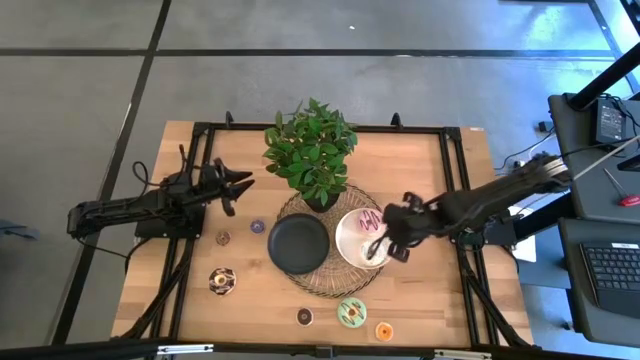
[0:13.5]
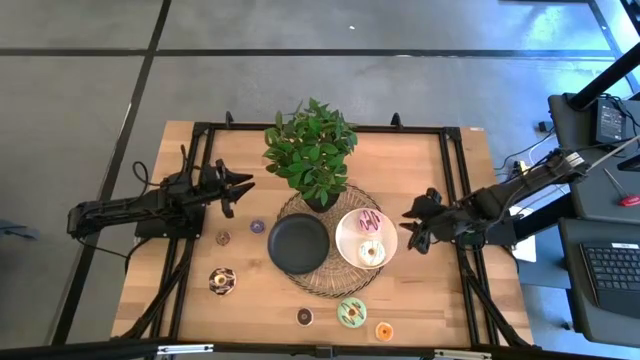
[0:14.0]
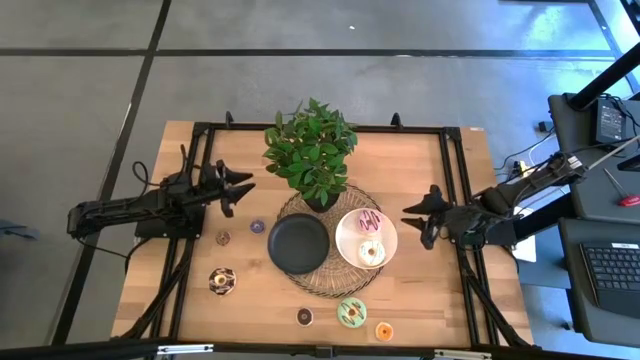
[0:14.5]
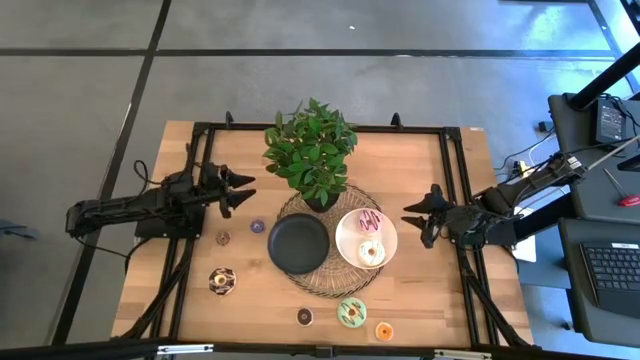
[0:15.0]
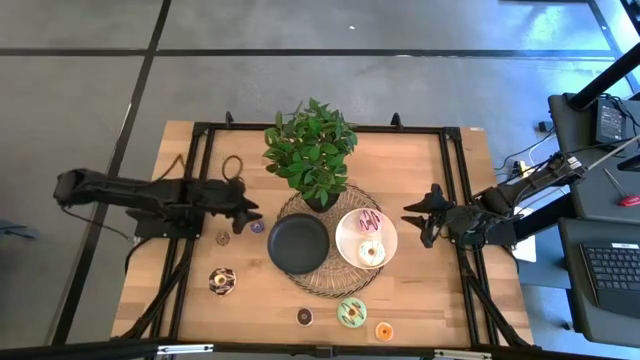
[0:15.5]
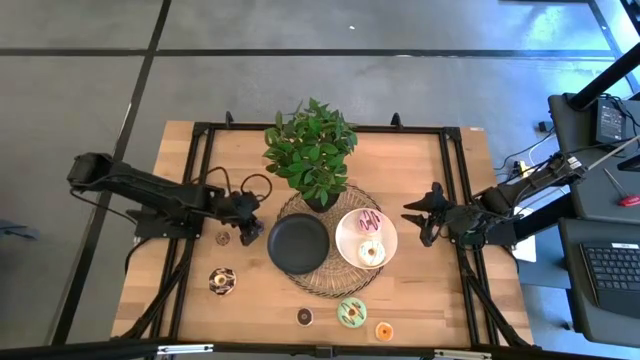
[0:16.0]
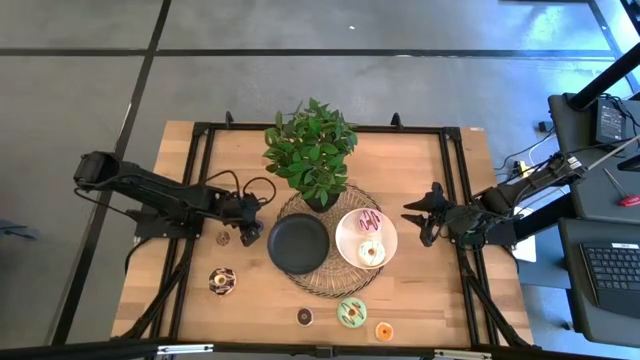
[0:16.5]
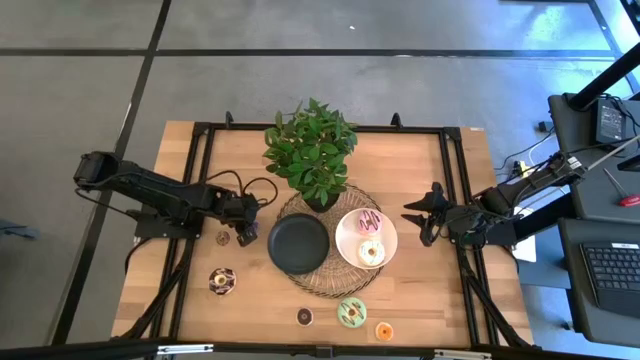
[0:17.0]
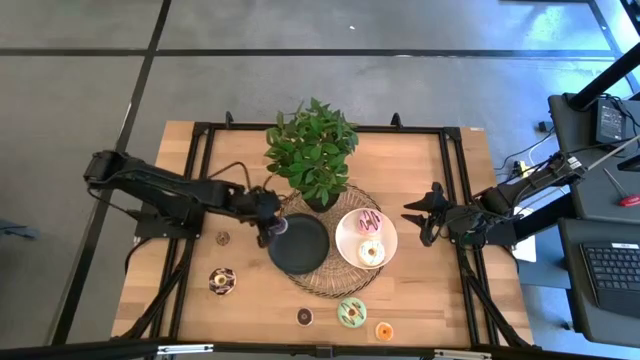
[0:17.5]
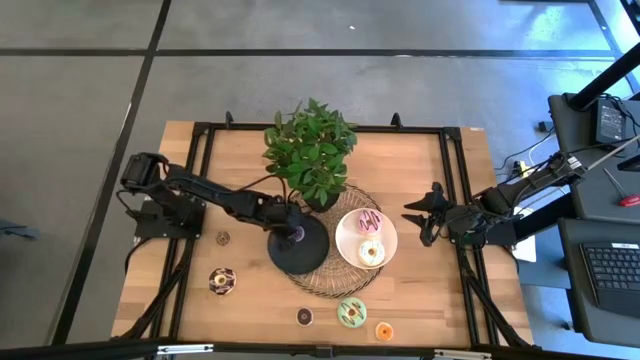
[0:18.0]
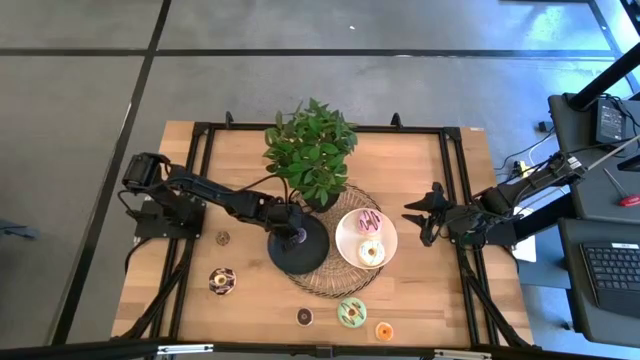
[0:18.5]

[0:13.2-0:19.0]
Task: Pick & Place donuts
Put the small blue donut on the black plate

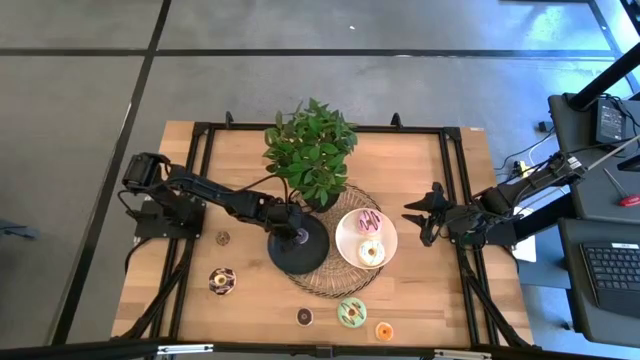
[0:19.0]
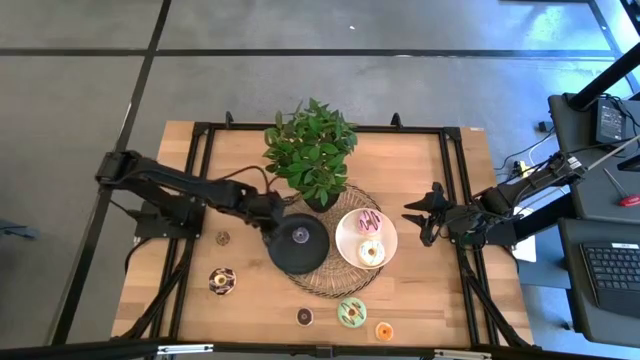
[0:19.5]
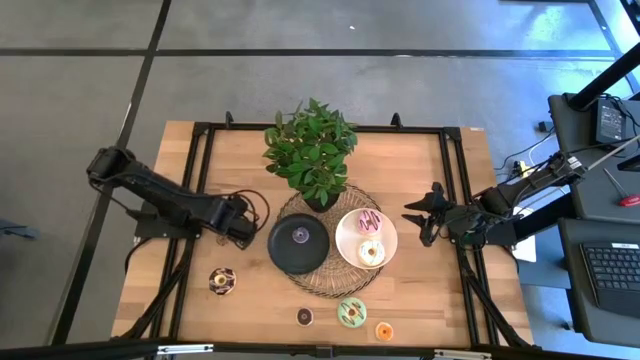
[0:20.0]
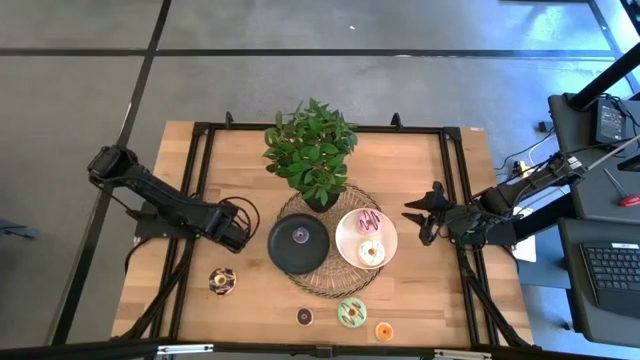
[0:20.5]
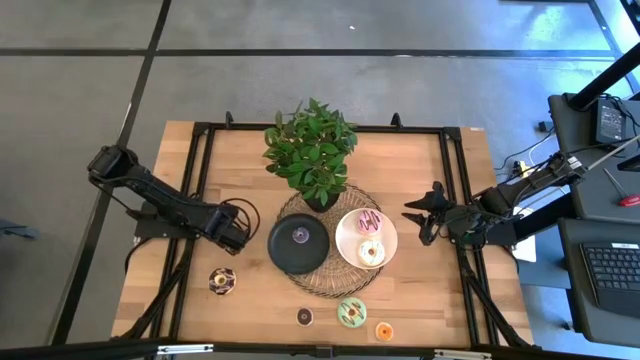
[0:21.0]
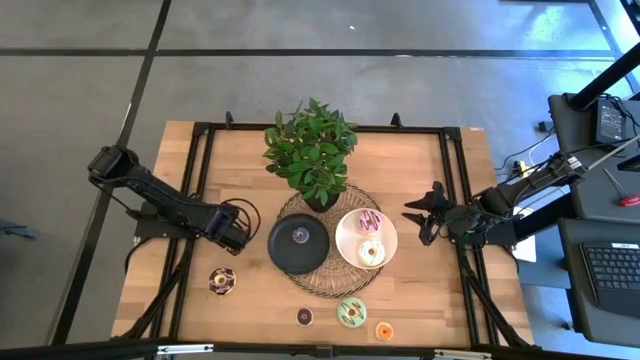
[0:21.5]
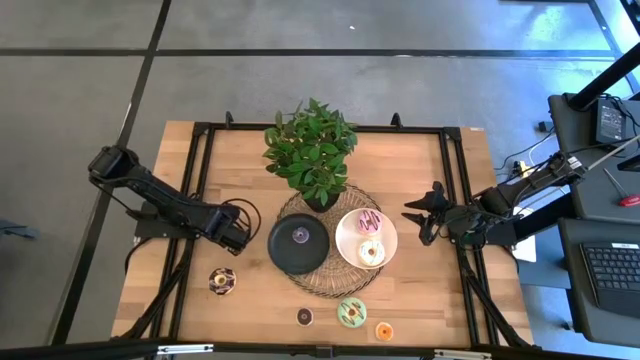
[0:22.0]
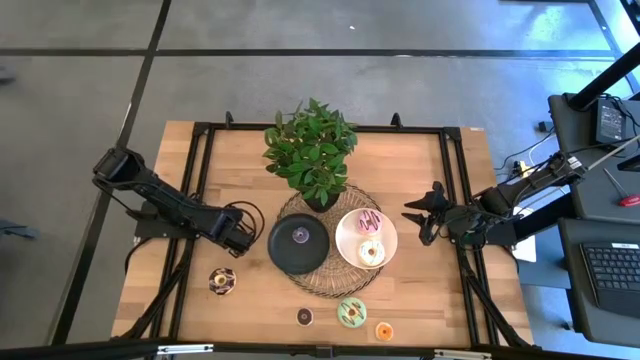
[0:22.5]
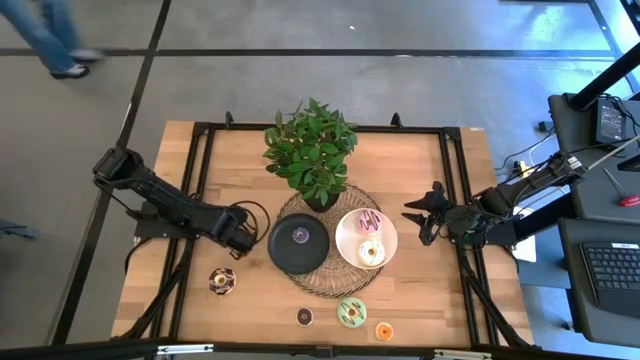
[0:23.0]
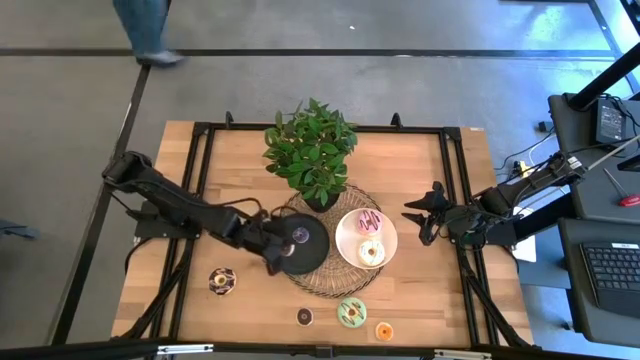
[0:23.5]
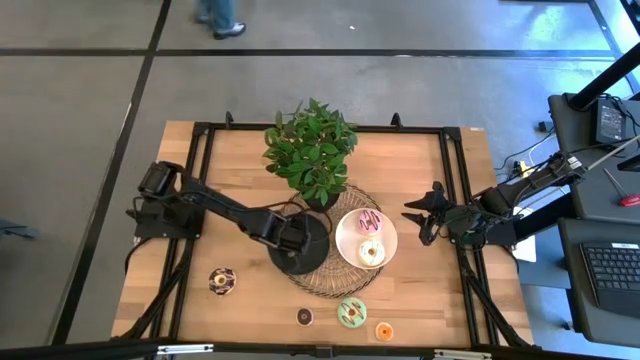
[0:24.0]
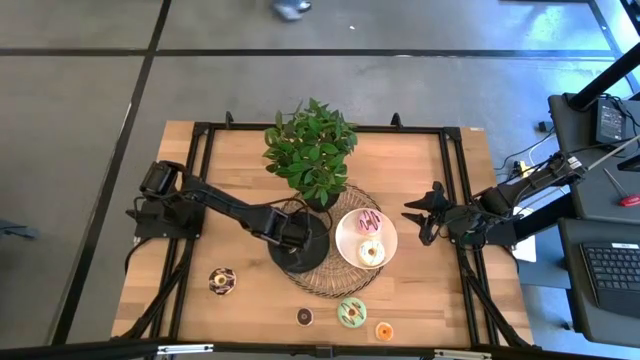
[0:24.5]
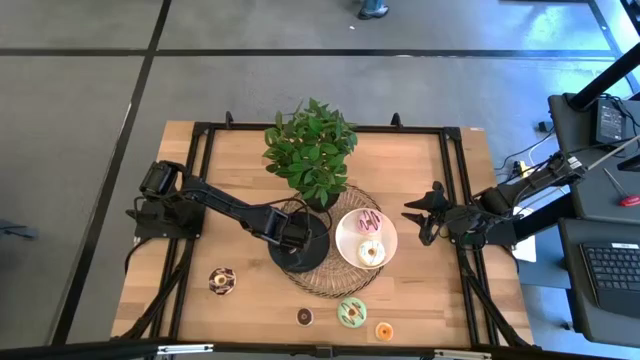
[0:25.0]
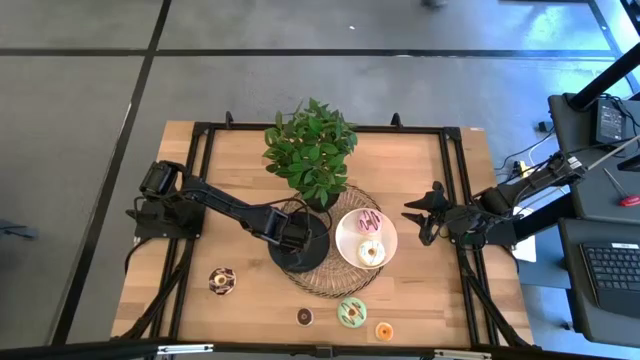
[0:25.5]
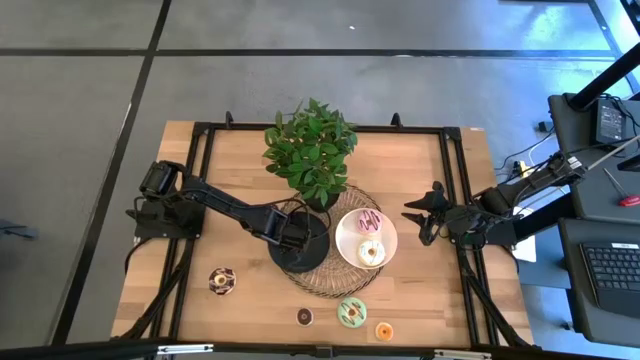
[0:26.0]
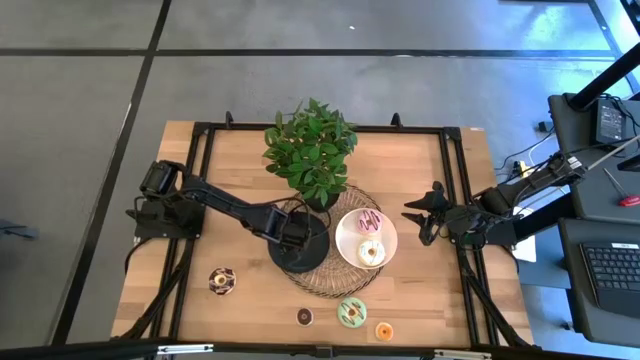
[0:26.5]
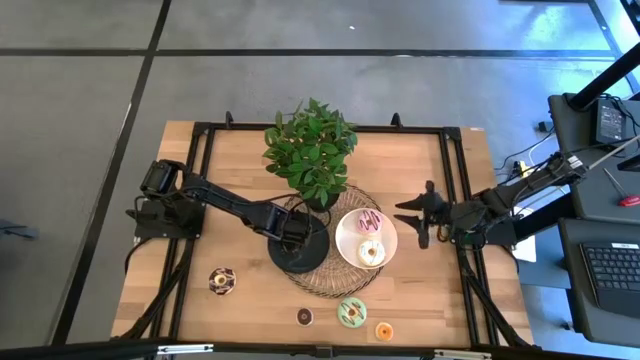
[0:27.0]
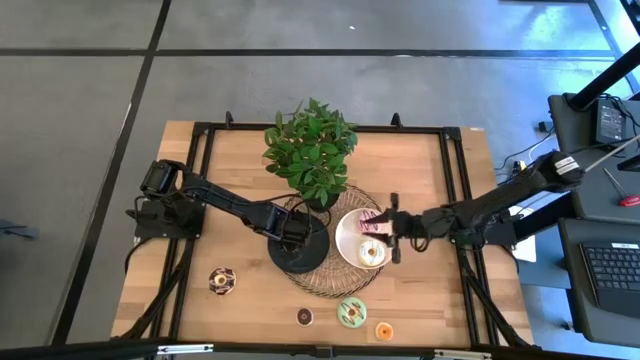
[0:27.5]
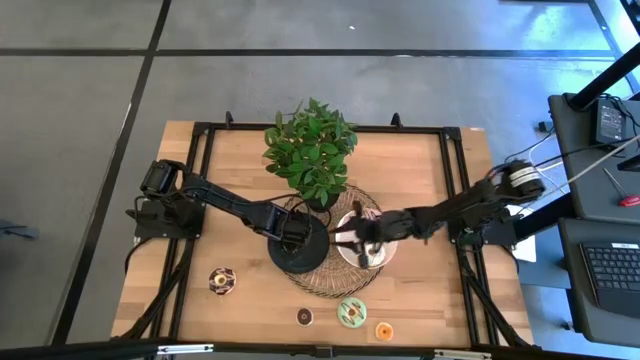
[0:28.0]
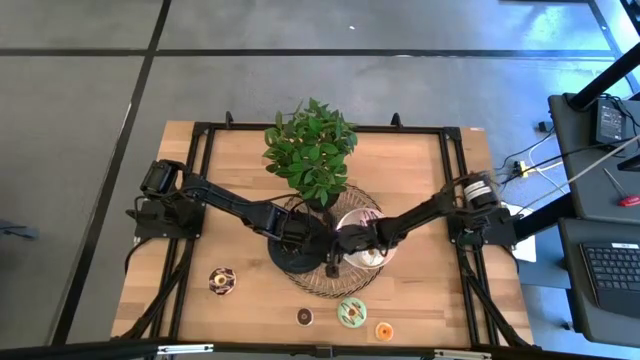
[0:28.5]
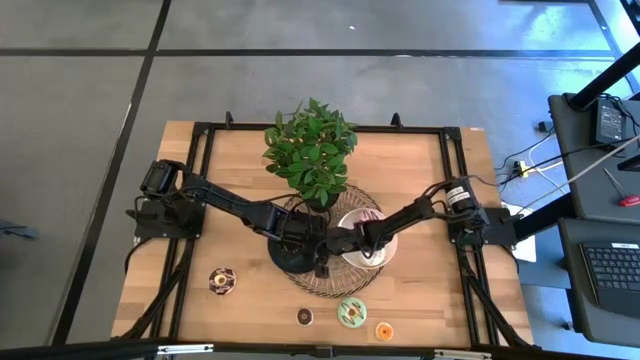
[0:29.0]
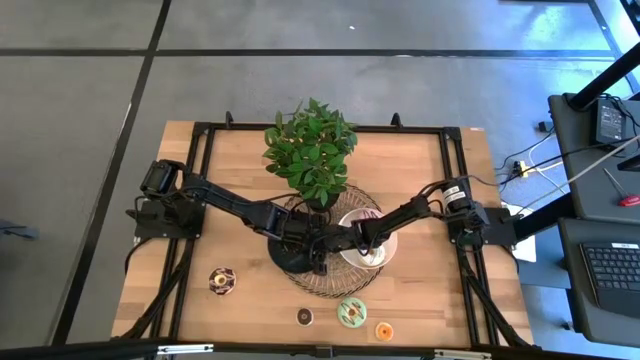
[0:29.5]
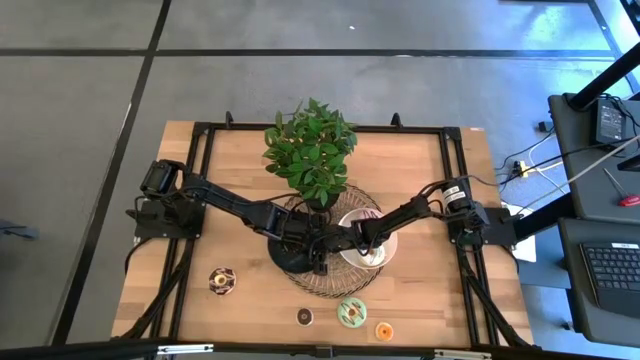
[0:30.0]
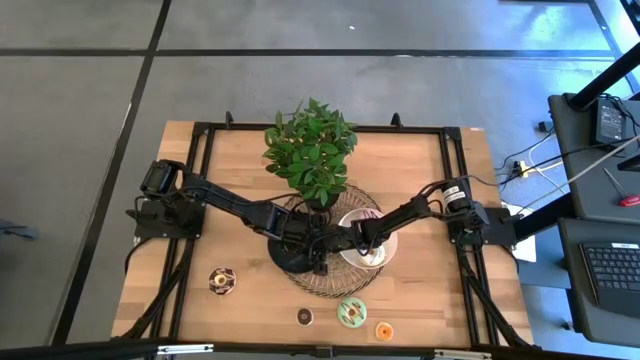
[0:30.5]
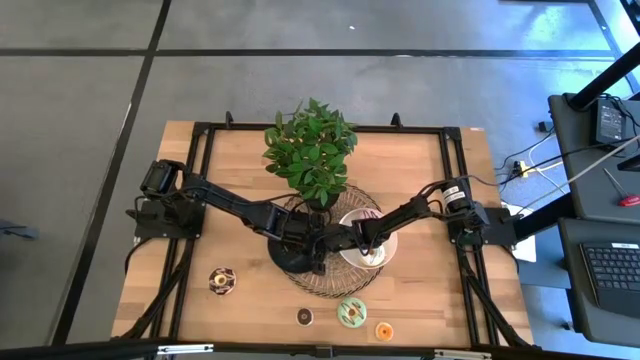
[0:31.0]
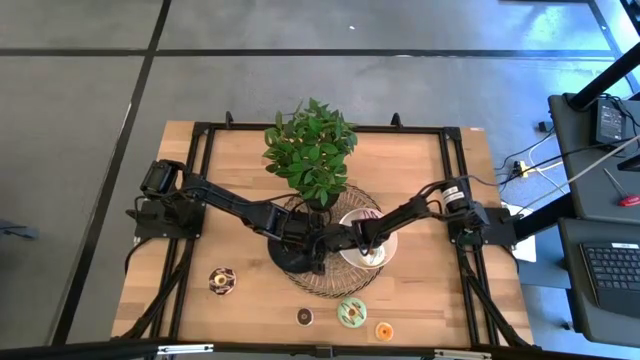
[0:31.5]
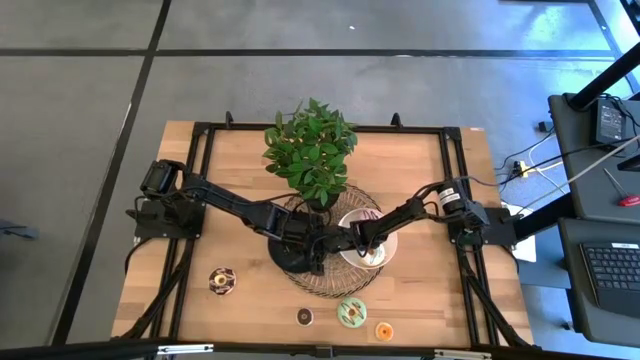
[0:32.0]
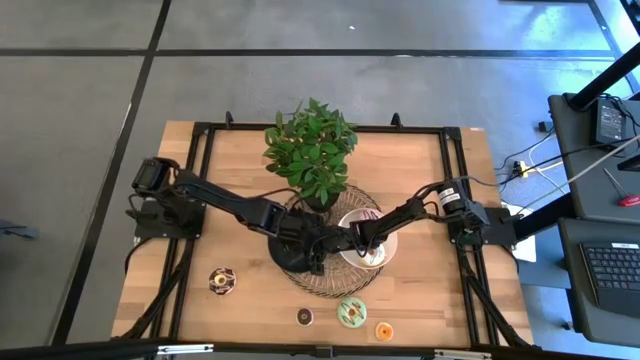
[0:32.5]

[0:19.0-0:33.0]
Put the small light brown donut on the black plate

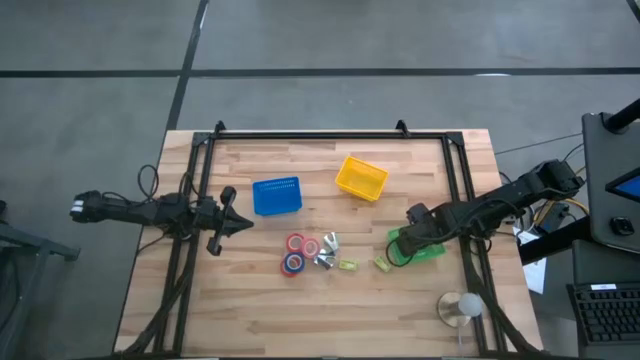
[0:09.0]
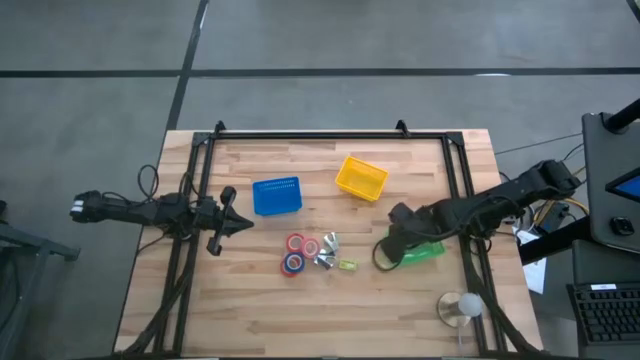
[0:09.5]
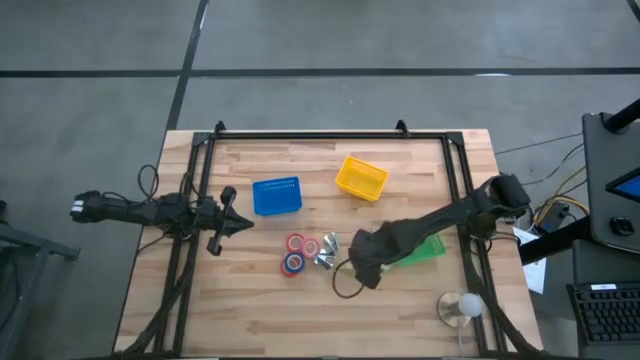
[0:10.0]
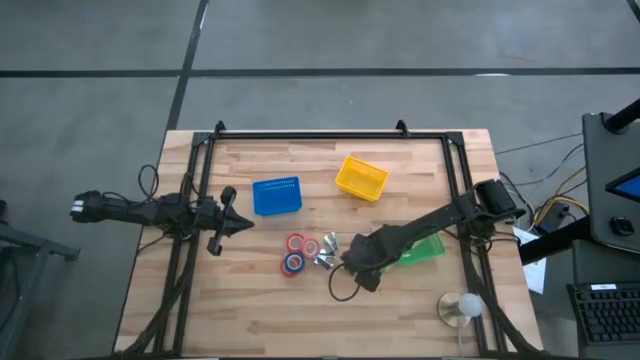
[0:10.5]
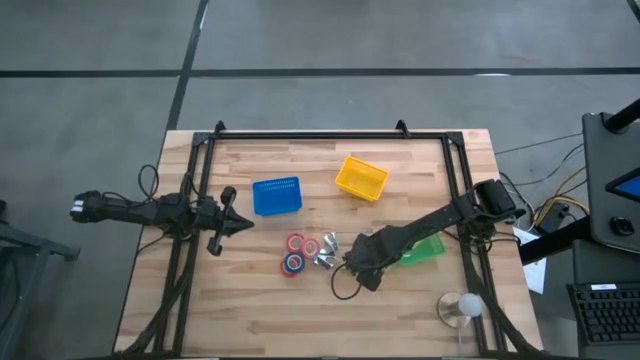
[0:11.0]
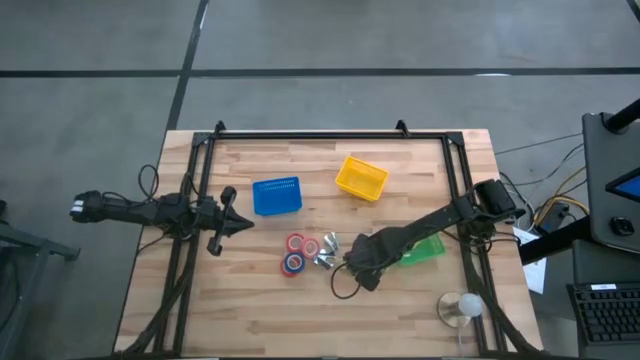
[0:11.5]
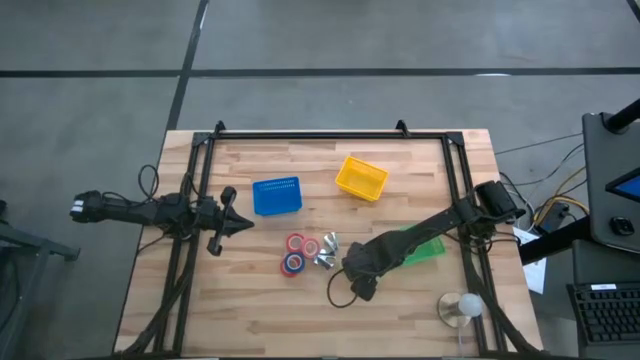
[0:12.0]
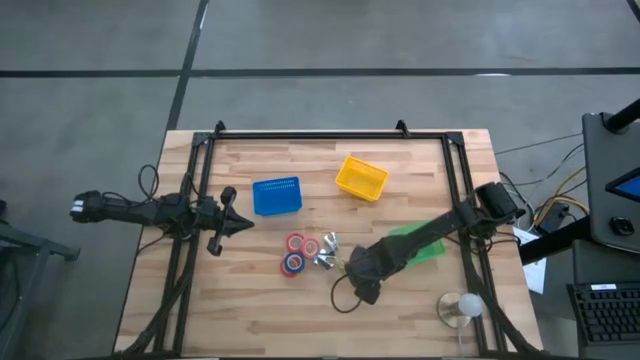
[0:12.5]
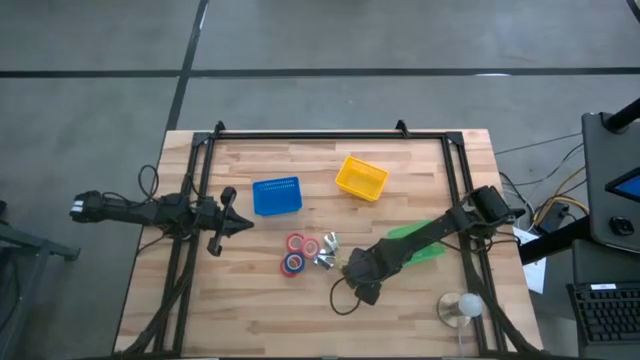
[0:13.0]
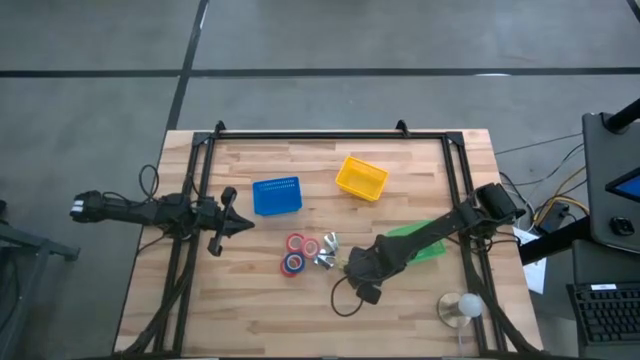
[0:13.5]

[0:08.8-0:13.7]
Task: Pick and place Stapler, Stapler remover, tape
Put the right green staple box into the green bin
